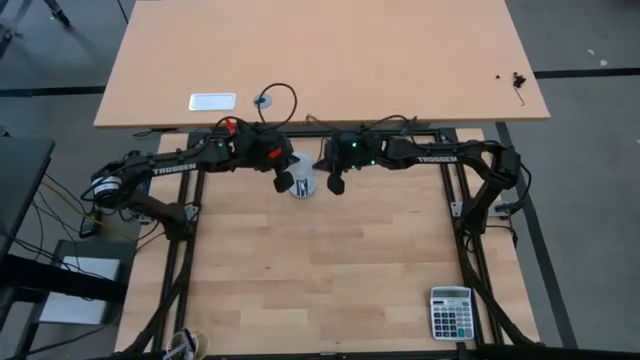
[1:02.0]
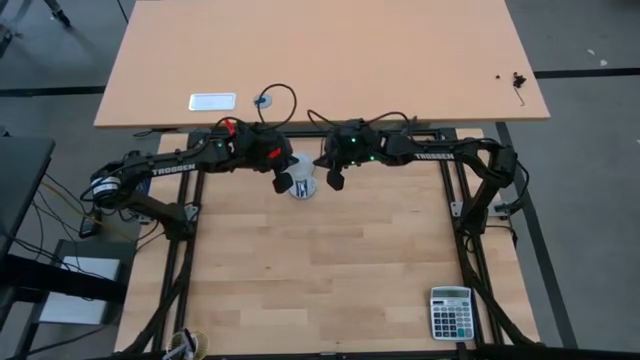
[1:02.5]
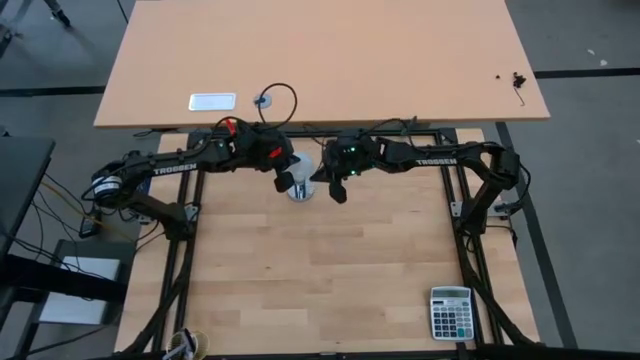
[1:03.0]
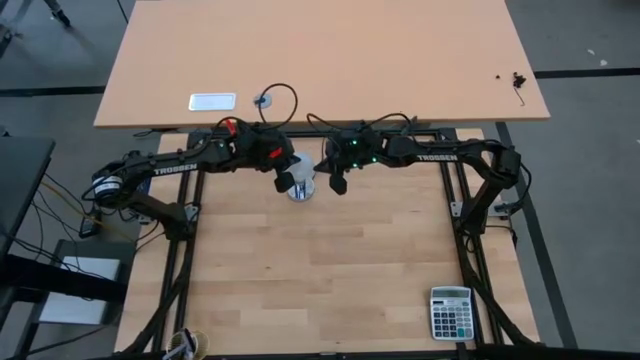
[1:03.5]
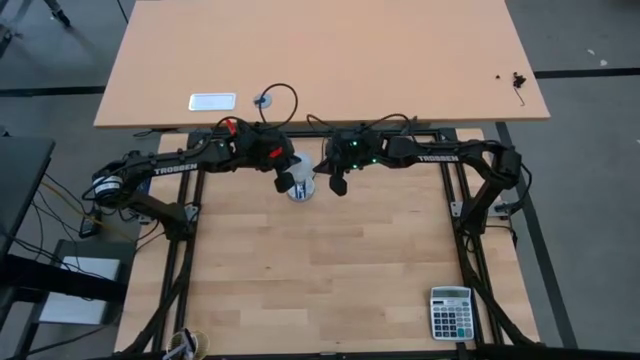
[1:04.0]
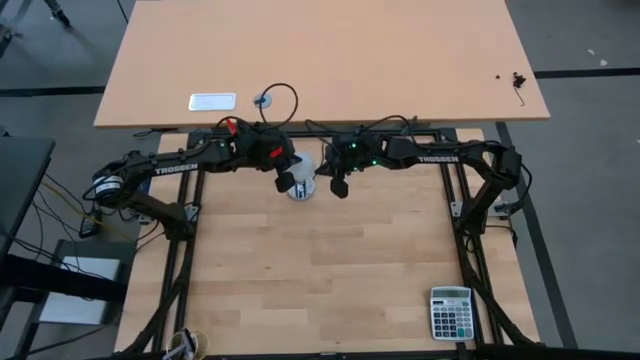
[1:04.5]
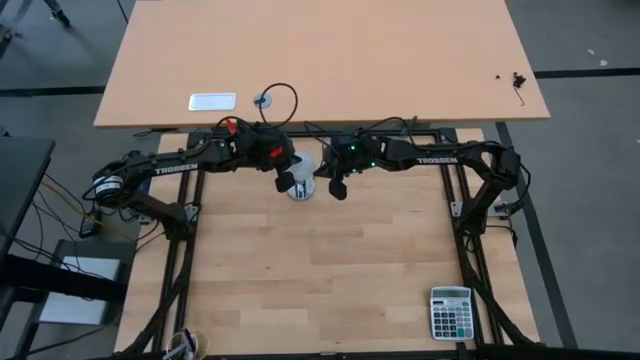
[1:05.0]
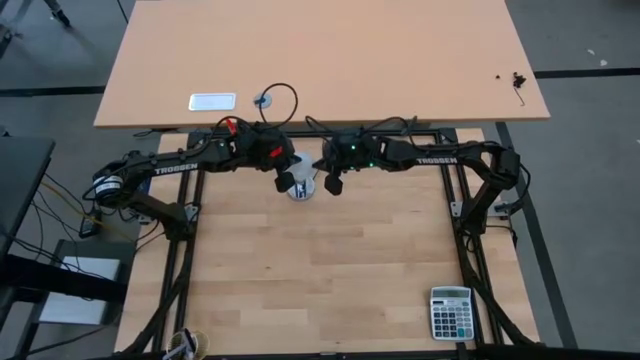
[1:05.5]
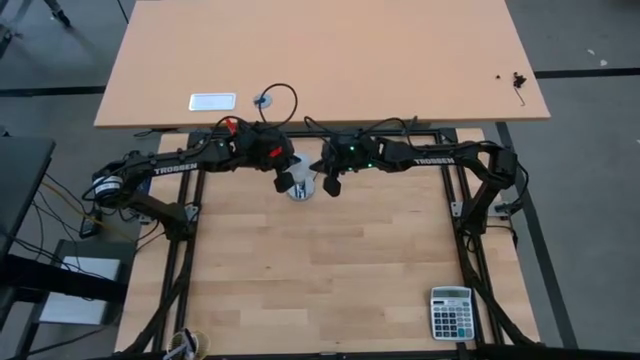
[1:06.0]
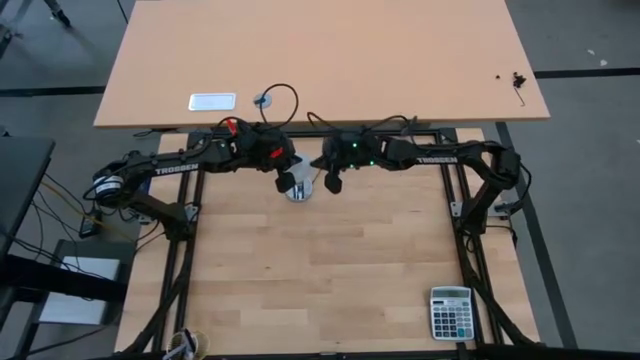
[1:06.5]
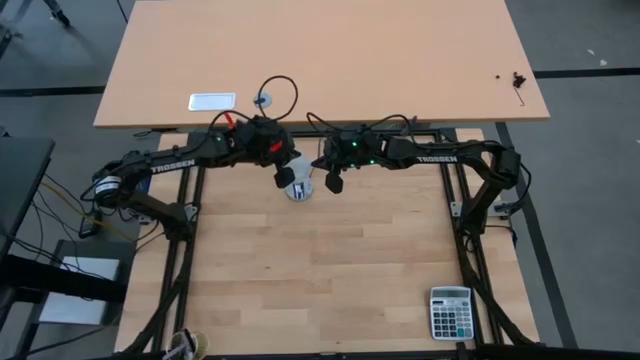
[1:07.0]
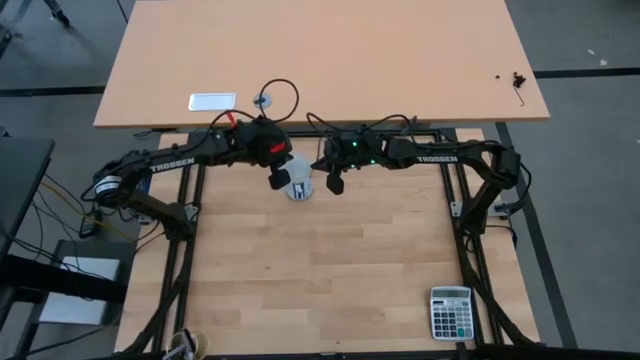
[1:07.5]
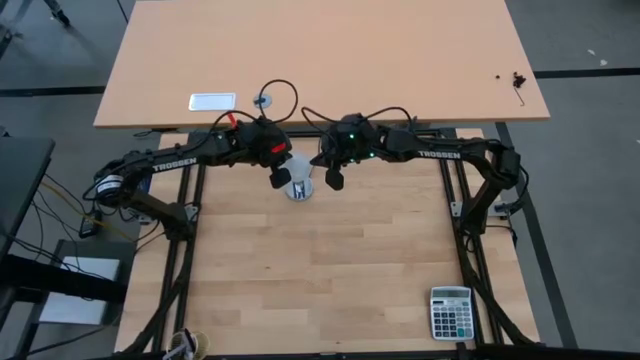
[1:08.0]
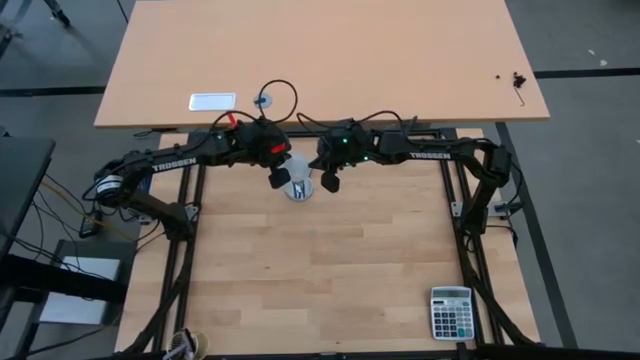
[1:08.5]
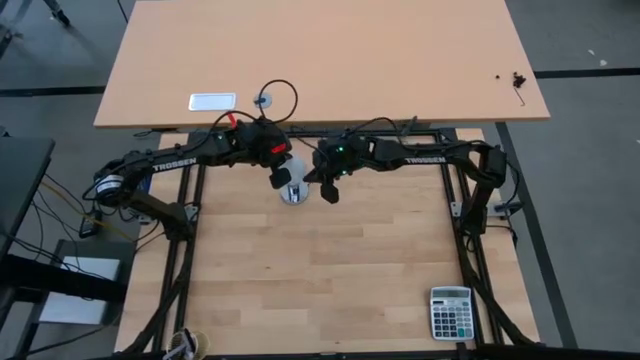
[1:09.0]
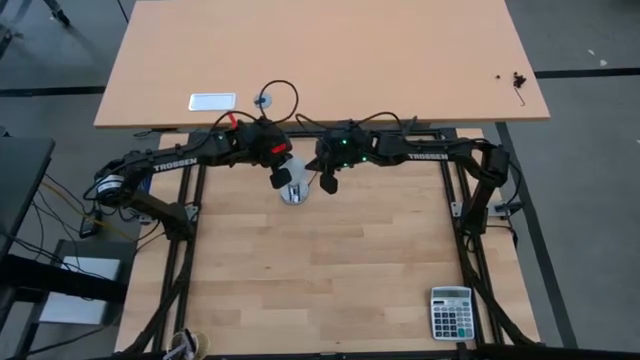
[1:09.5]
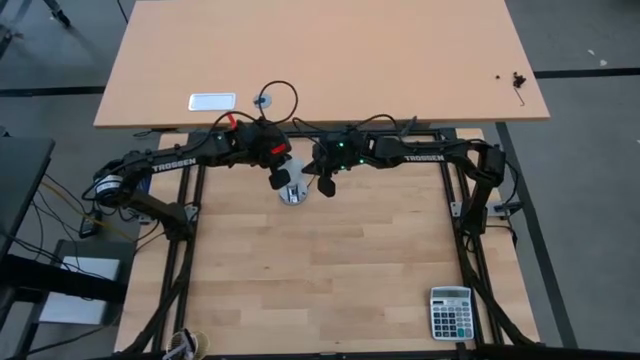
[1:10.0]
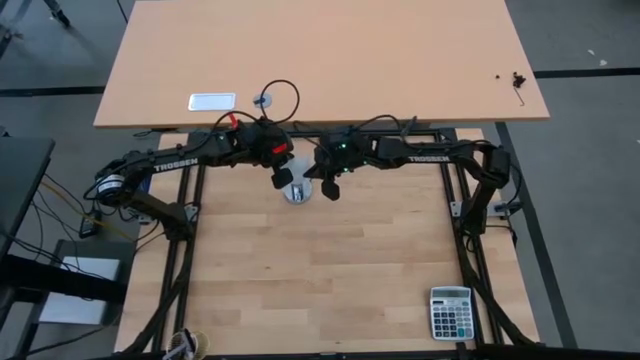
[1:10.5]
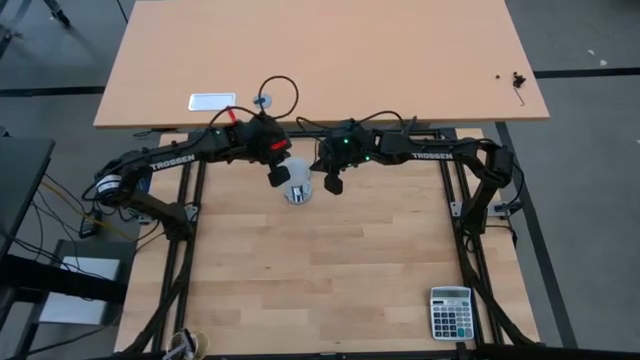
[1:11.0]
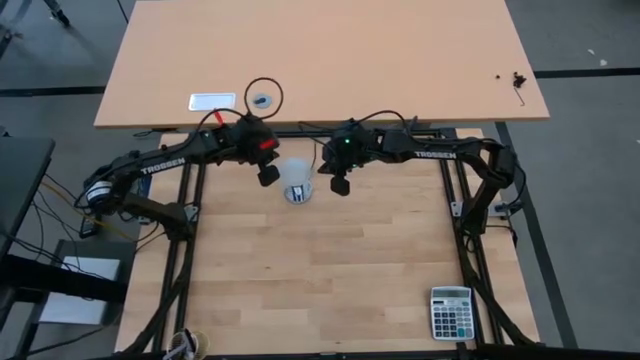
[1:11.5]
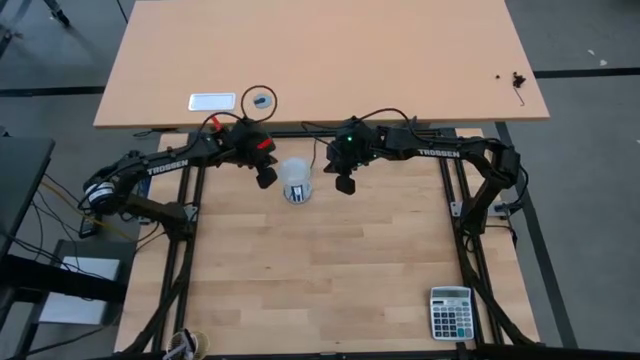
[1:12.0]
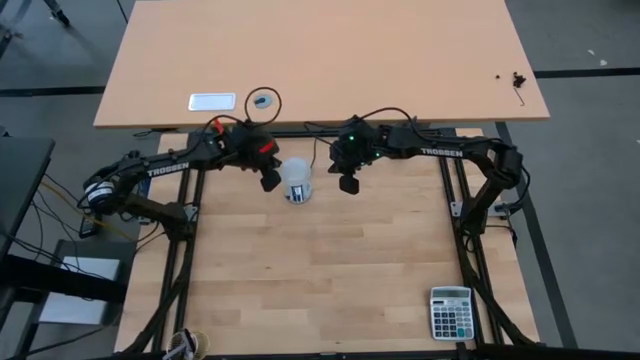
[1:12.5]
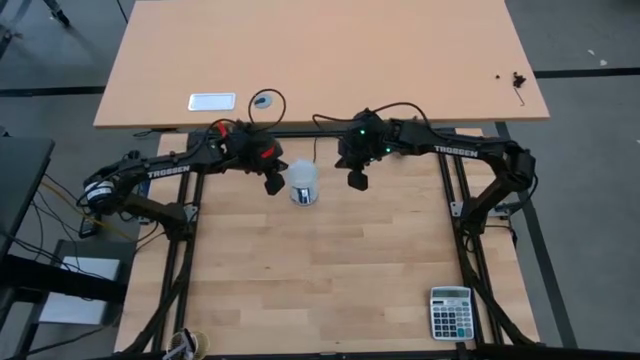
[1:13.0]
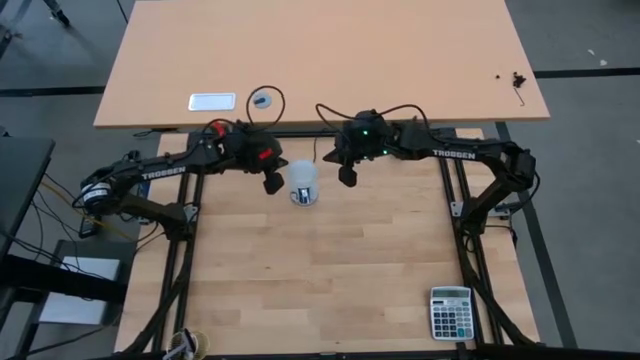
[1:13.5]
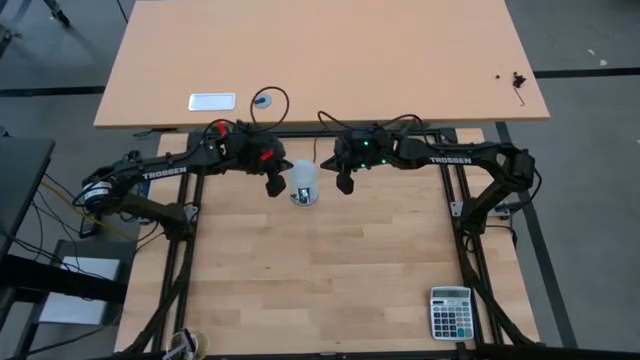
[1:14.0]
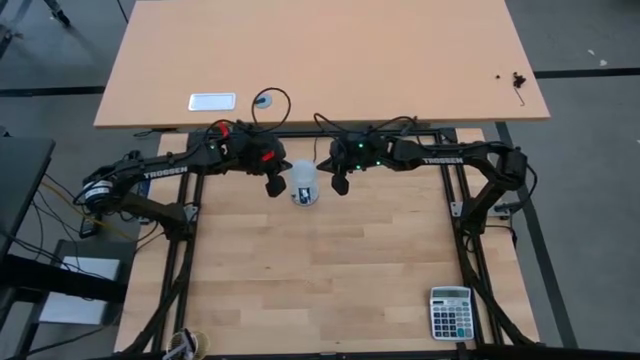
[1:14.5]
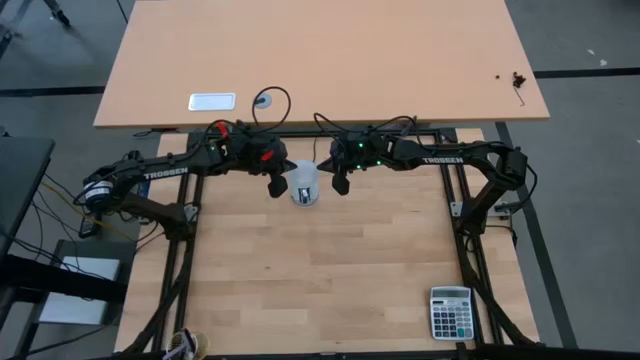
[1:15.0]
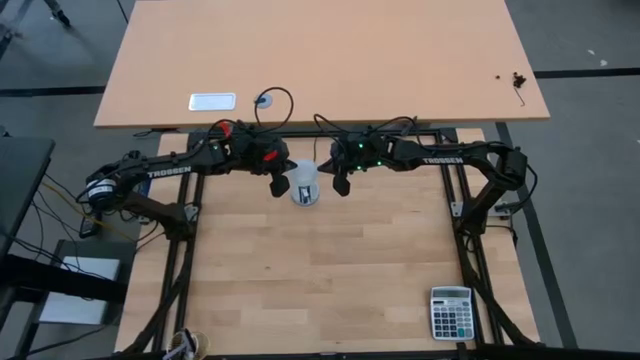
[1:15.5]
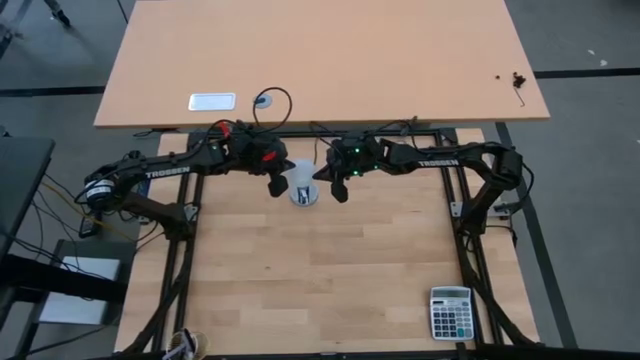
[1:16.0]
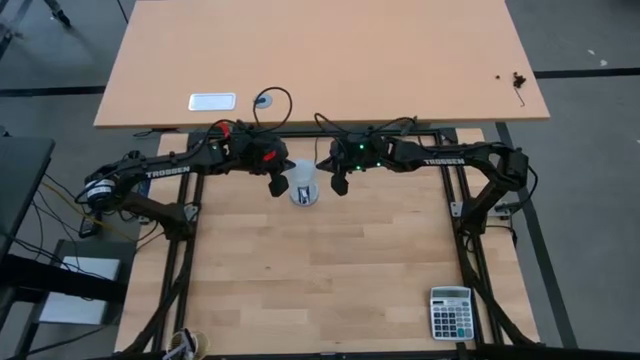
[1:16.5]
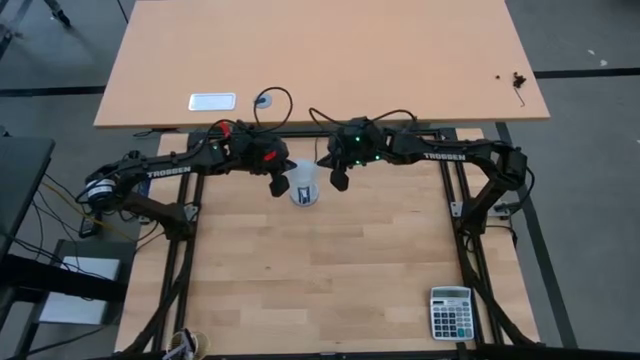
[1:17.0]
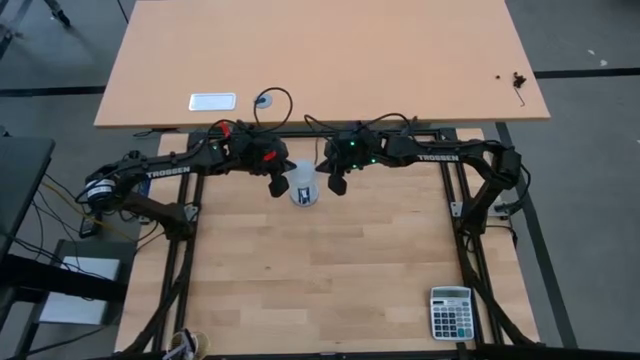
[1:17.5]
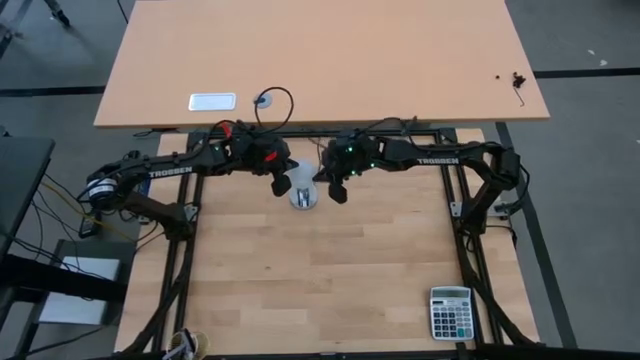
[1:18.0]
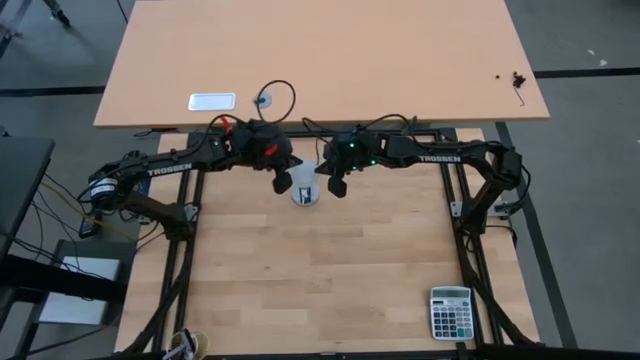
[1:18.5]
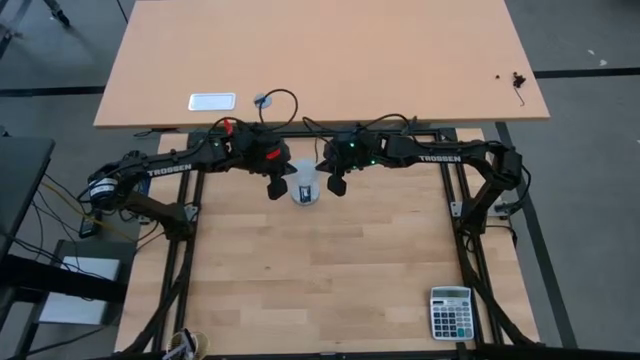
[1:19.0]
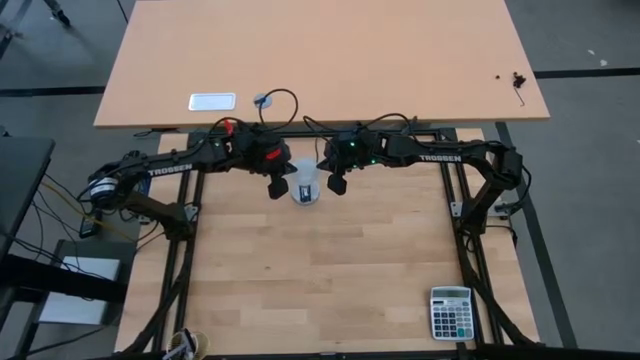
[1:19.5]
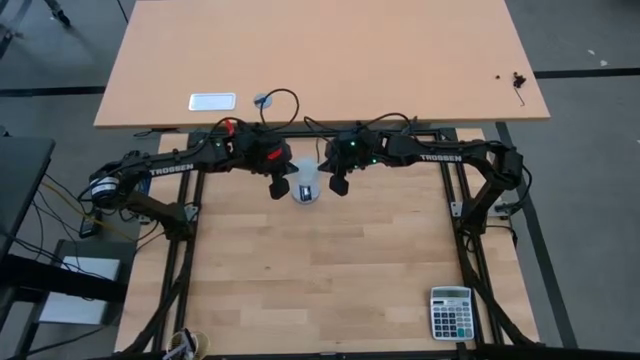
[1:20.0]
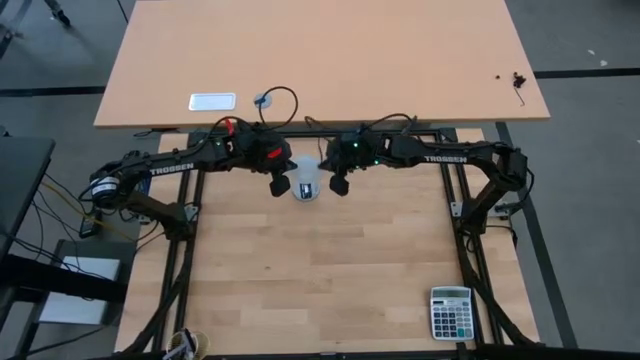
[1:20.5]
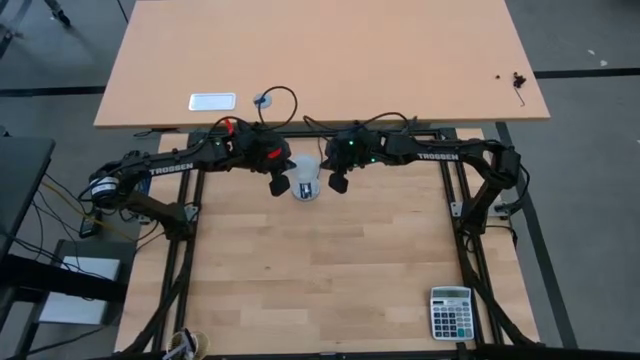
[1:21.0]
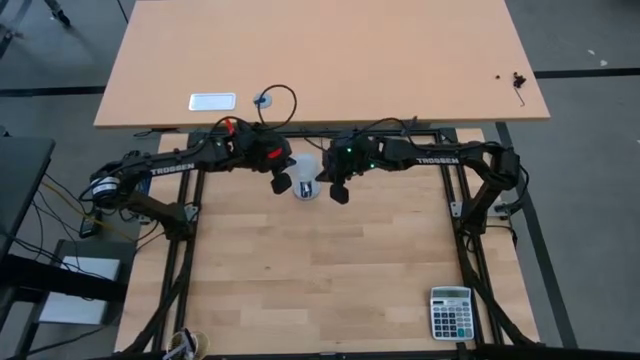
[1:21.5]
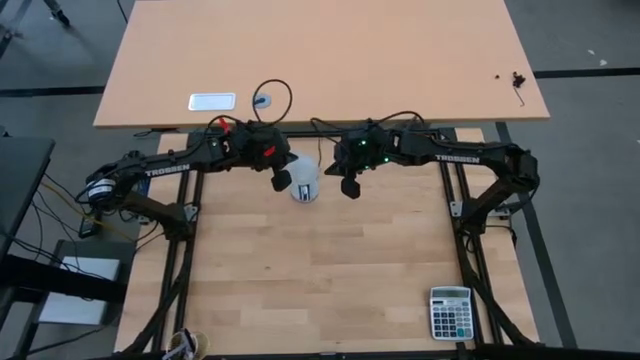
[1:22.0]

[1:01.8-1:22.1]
Task: Screw lightbulb
Insert the light into the lamp socket
